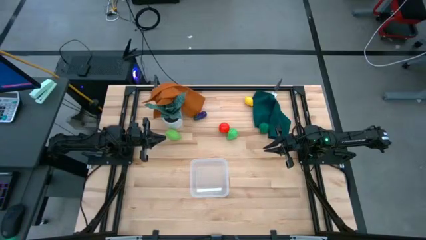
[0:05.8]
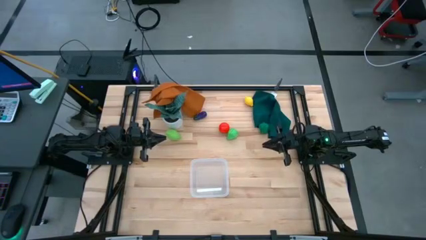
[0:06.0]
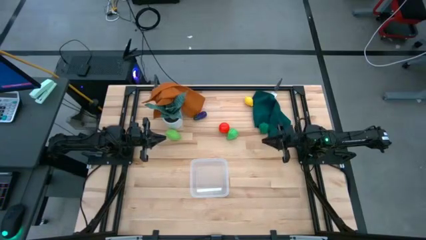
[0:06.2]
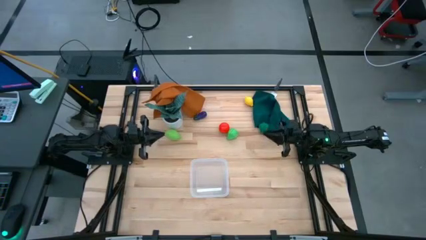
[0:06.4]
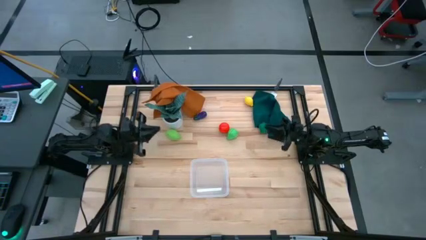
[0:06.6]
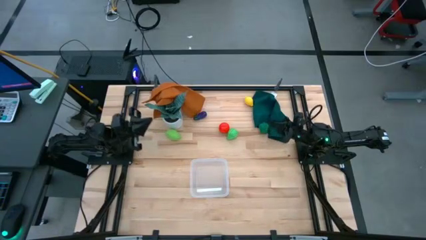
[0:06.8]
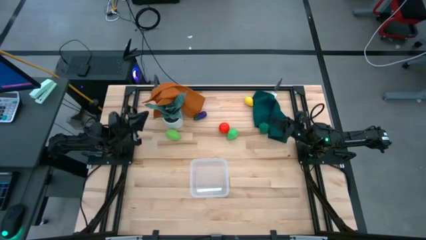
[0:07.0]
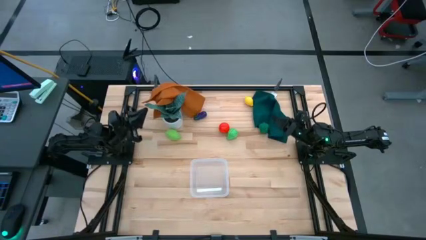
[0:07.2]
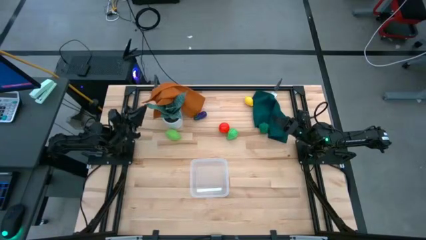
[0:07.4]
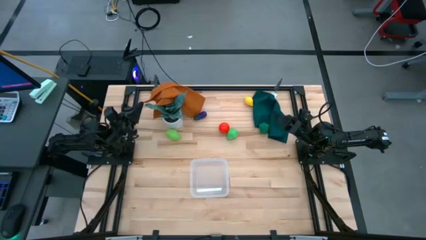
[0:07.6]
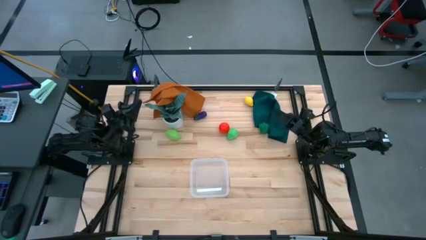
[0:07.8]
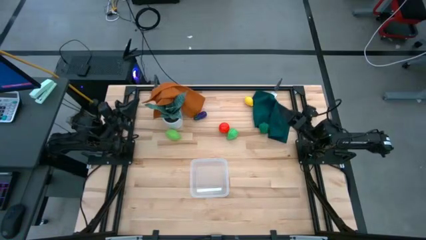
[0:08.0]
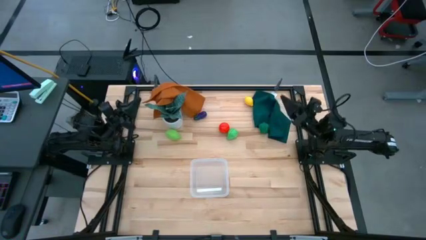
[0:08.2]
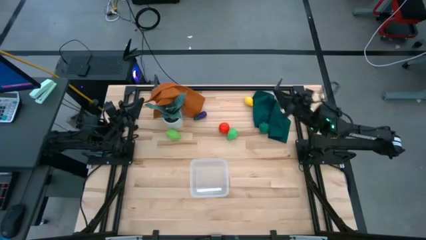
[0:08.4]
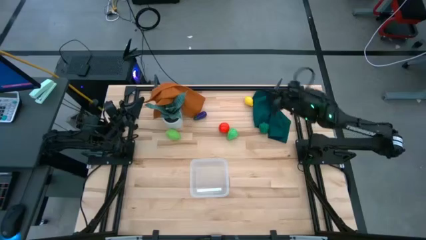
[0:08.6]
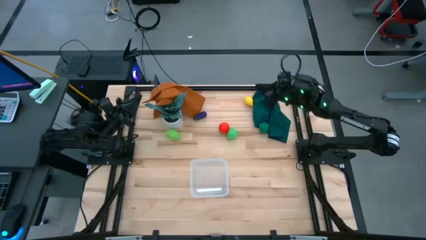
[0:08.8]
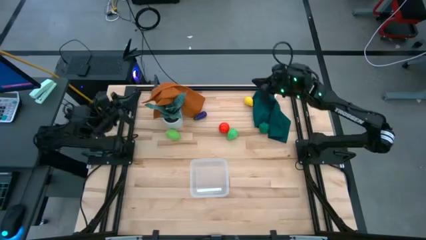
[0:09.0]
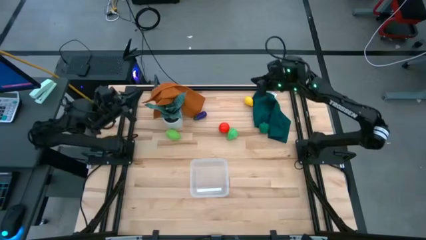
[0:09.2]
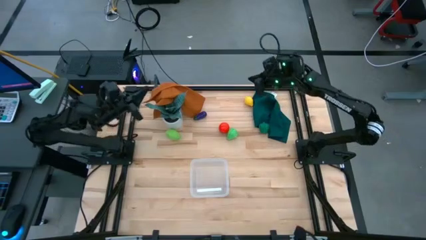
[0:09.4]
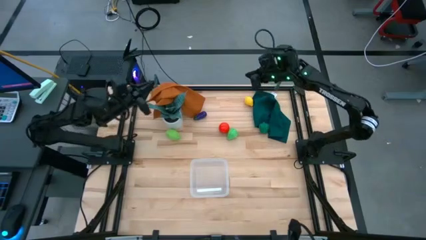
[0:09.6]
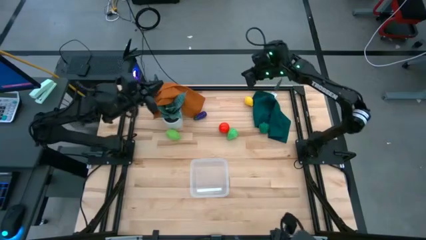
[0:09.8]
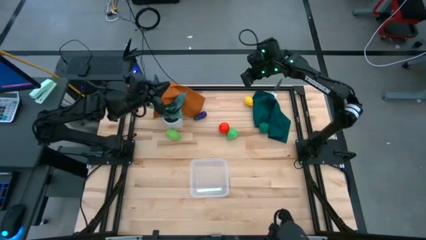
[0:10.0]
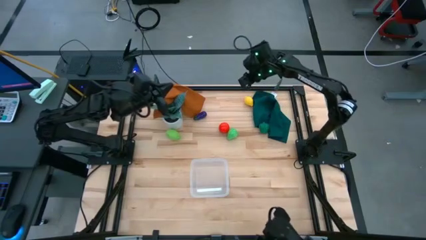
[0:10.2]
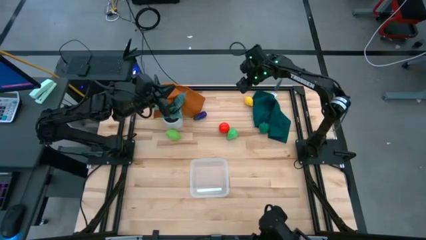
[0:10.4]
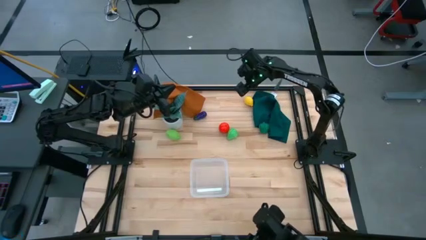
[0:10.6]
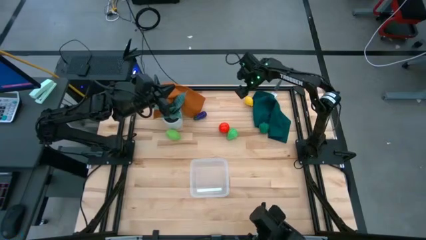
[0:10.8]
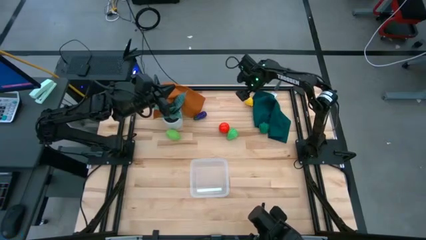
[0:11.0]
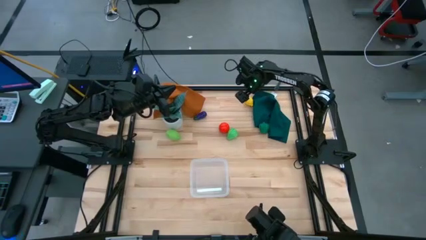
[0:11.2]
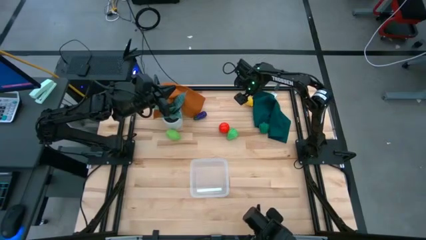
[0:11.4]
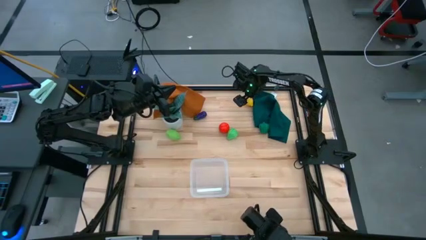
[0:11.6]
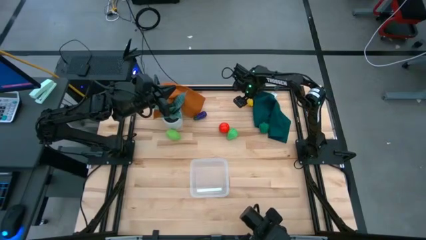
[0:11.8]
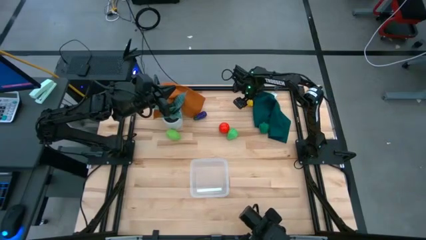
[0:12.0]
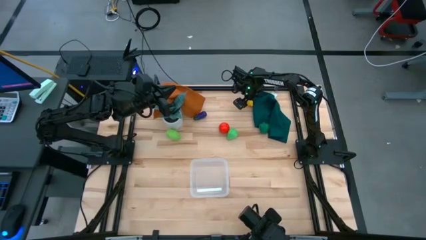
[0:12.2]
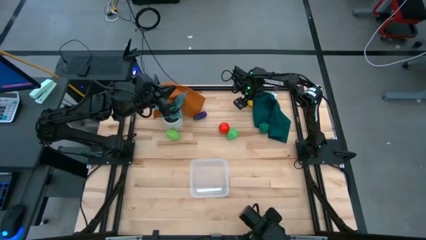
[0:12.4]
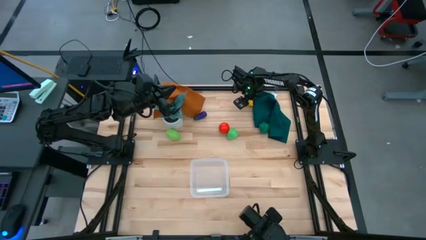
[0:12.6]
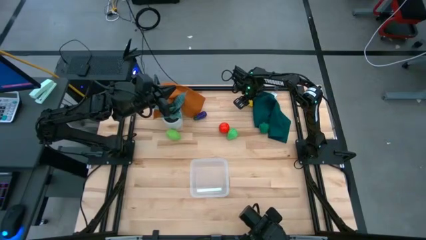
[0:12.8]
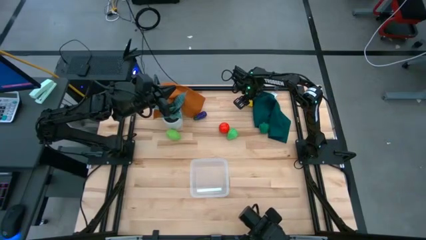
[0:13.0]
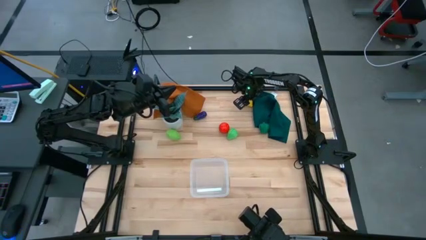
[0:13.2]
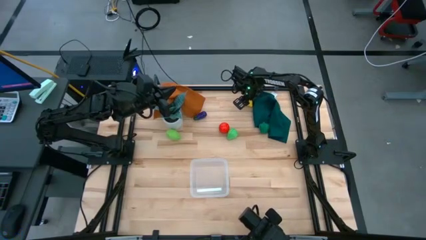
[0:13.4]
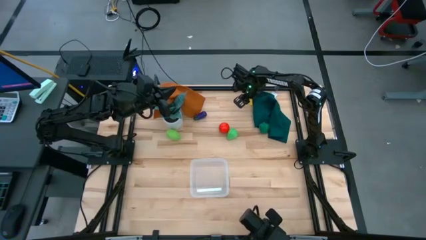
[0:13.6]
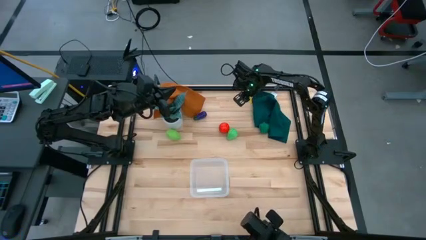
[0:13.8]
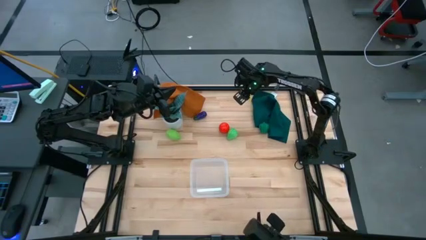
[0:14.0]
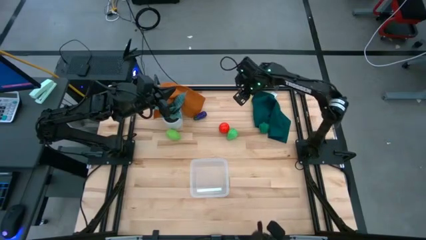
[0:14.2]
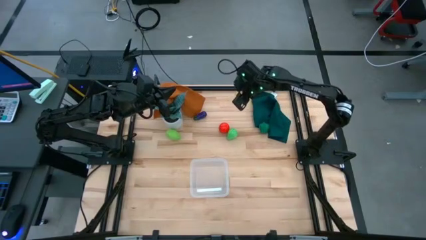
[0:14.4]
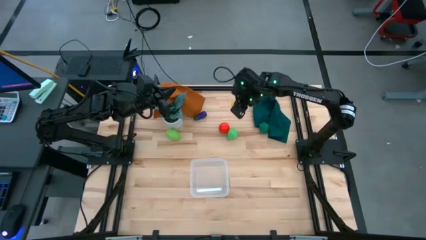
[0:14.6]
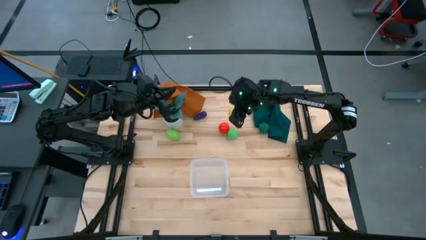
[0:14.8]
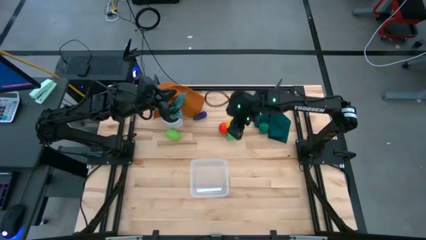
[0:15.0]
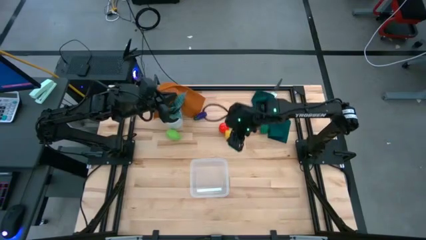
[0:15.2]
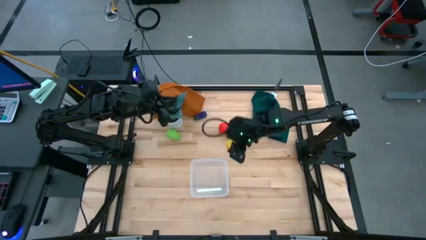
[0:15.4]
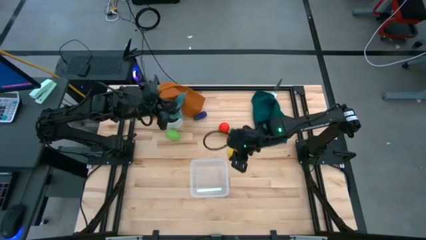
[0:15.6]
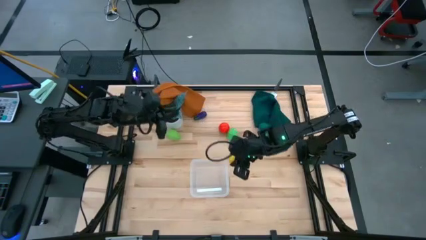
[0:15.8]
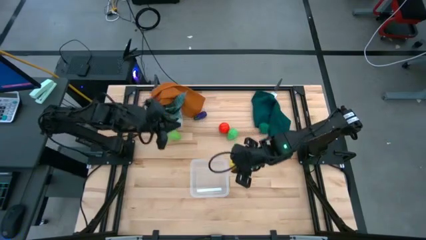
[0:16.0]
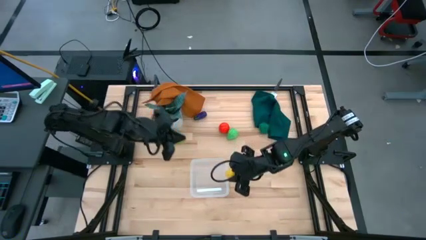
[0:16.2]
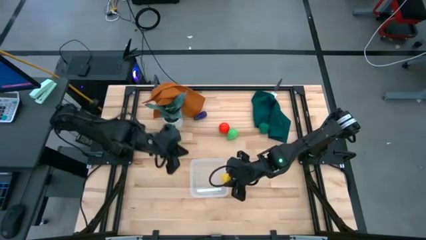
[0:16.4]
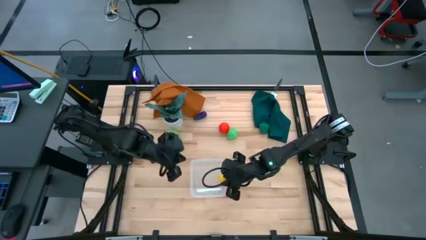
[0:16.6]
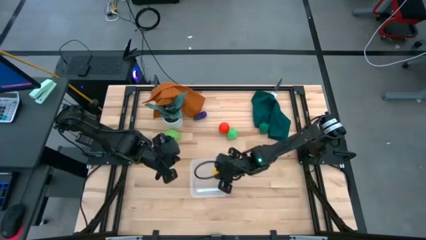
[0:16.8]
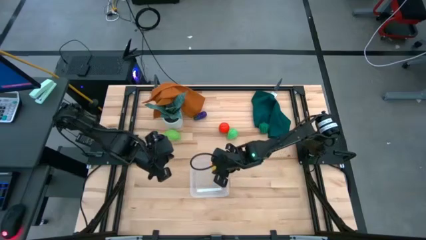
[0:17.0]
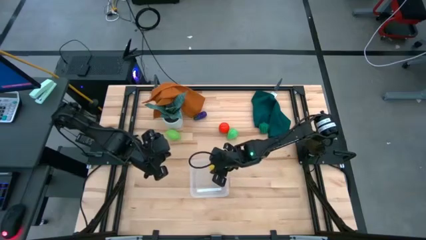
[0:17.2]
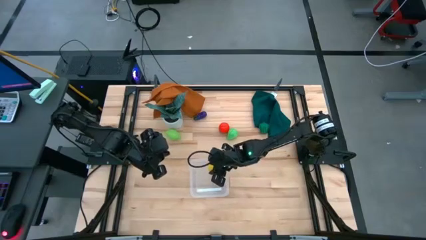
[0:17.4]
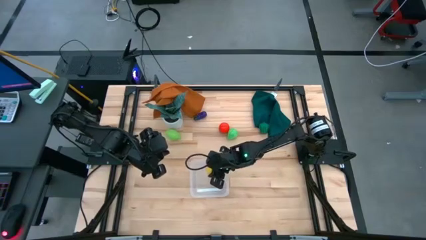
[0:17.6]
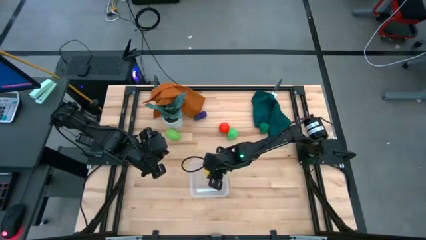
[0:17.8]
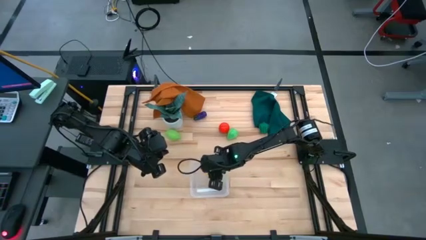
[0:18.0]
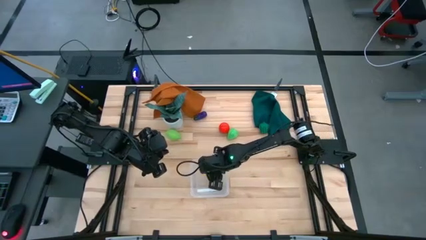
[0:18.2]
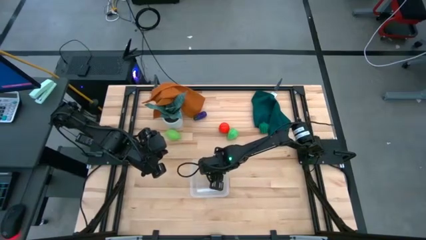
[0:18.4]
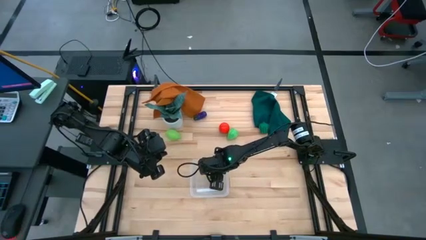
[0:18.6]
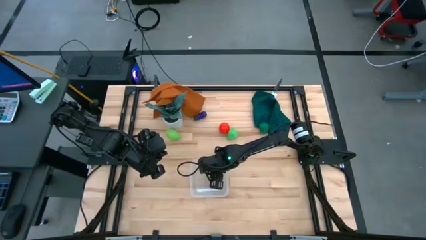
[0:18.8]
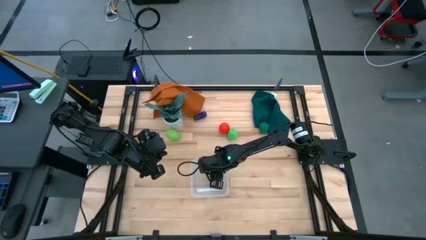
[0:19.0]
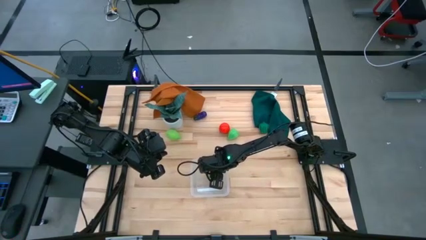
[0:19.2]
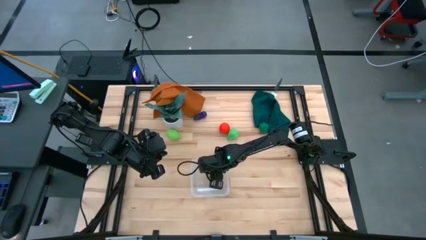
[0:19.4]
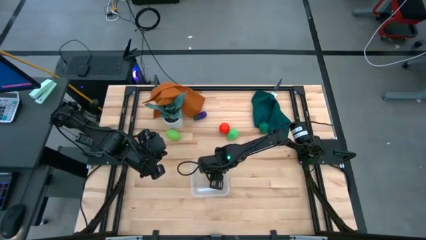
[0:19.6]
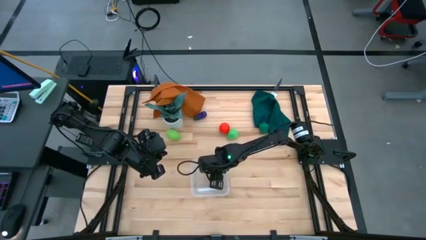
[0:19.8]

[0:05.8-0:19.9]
Task: Pick and placing Produce into tupperware
Put the lemon into the transparent bin
